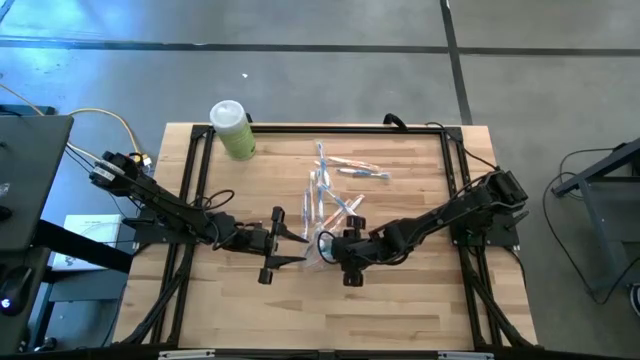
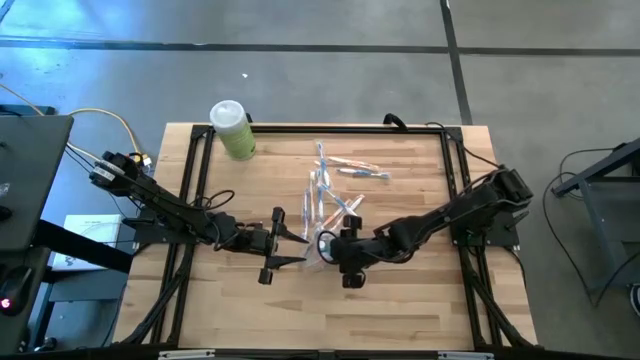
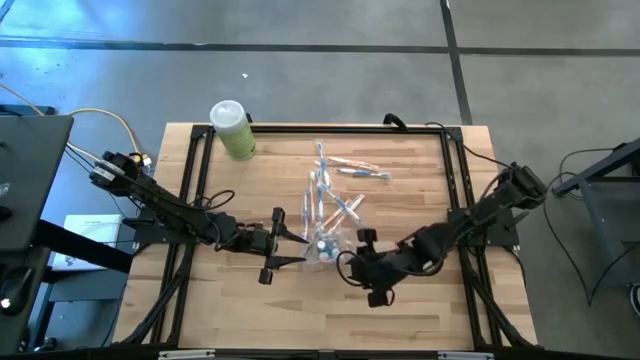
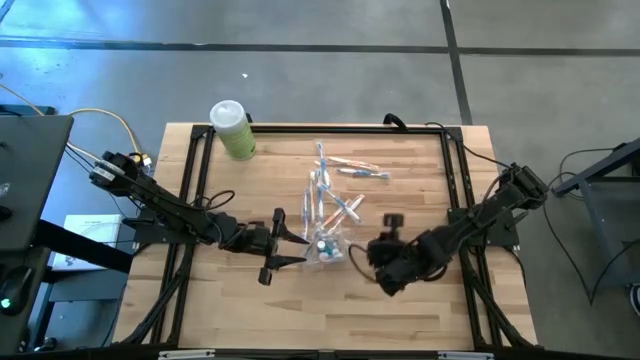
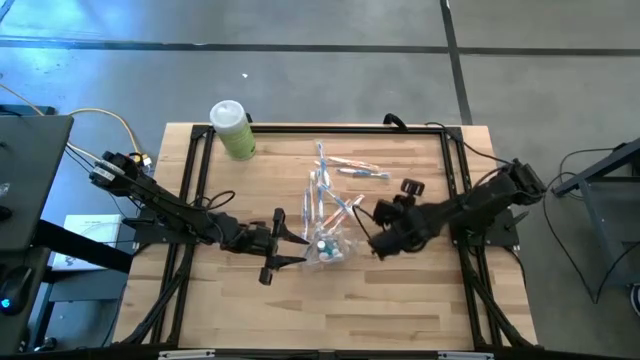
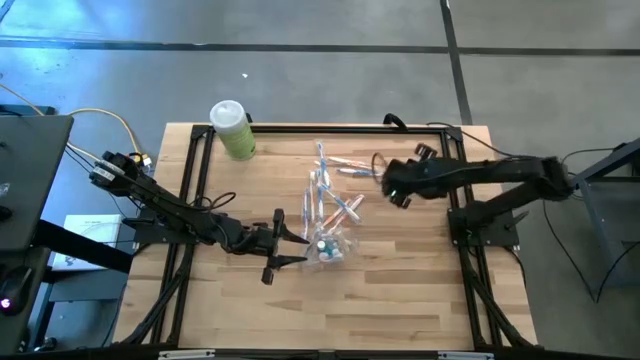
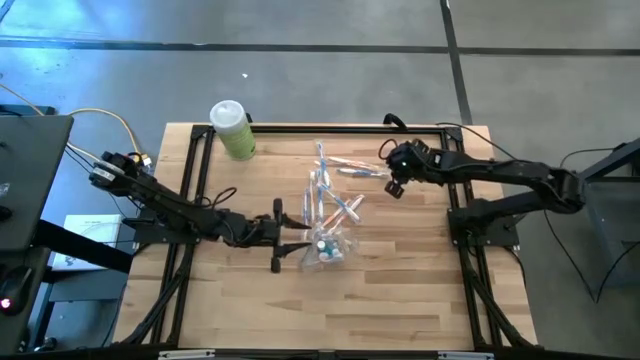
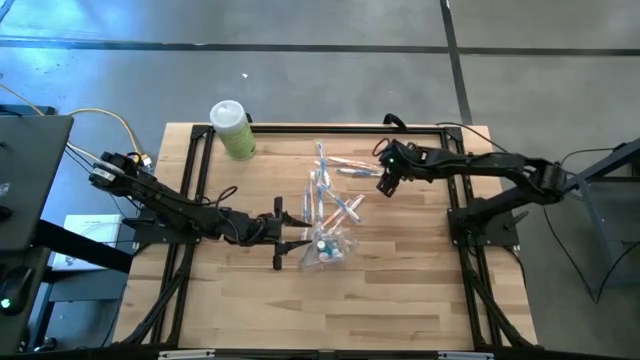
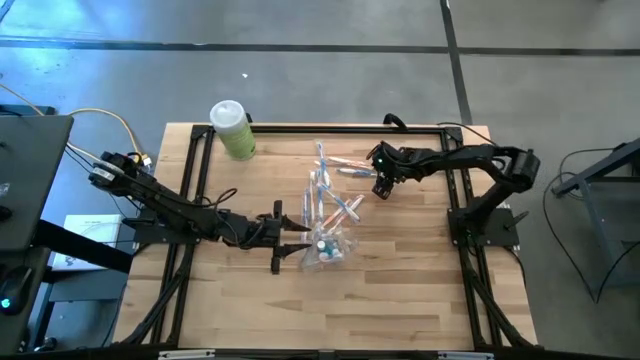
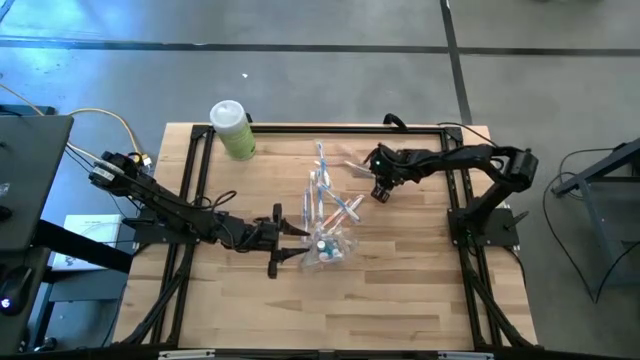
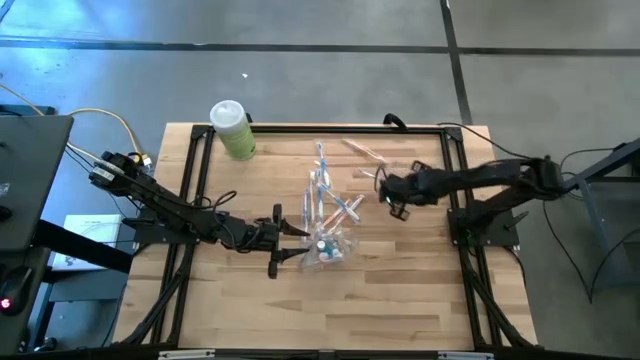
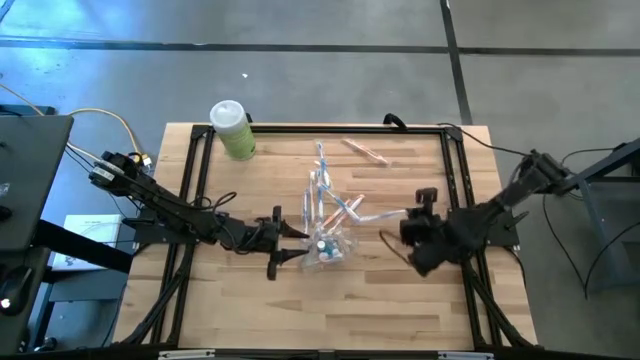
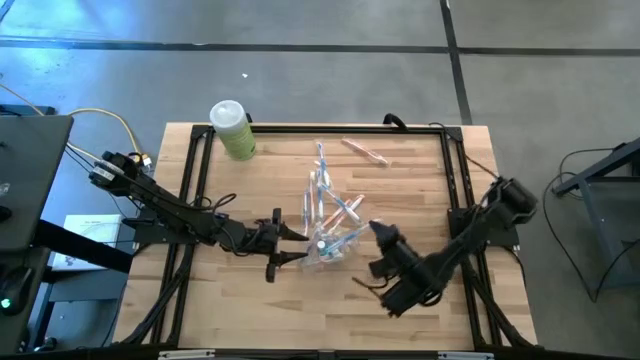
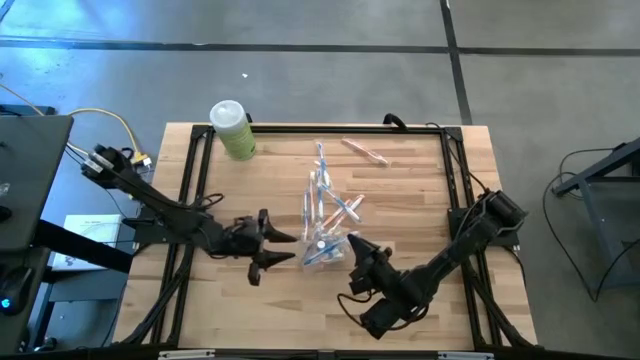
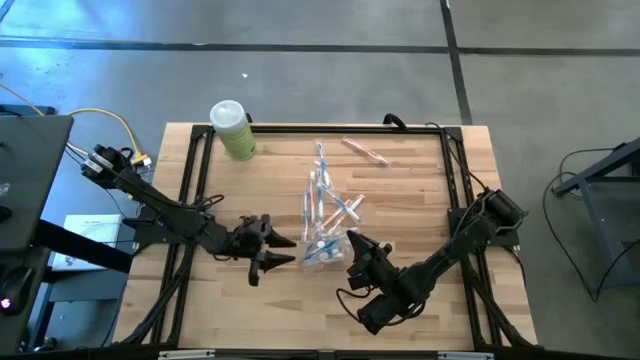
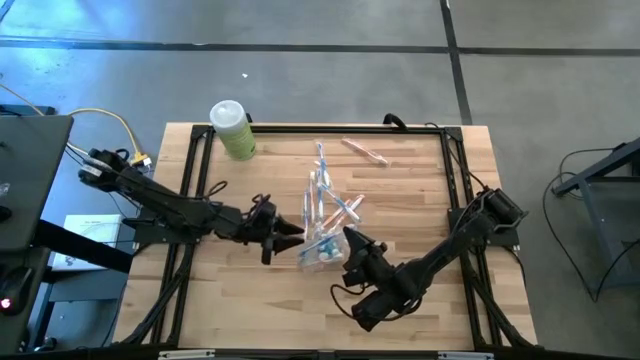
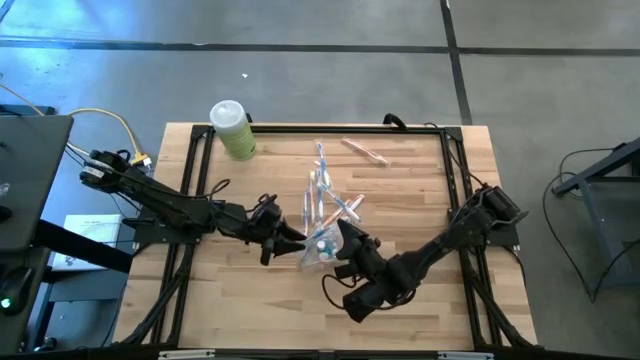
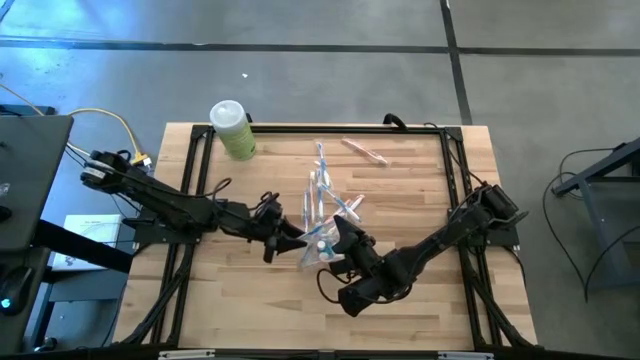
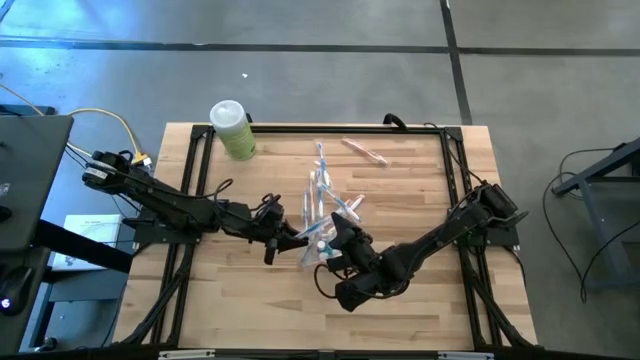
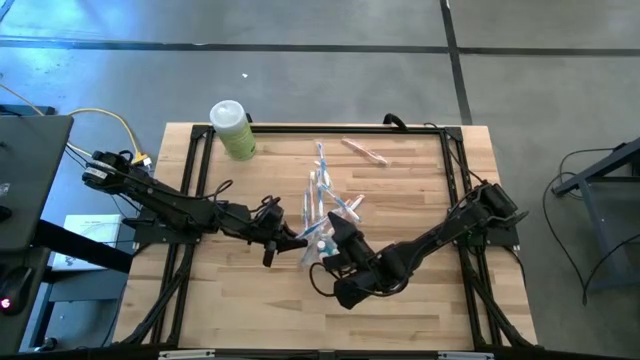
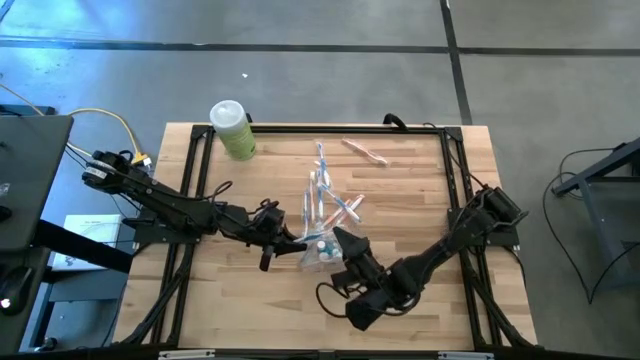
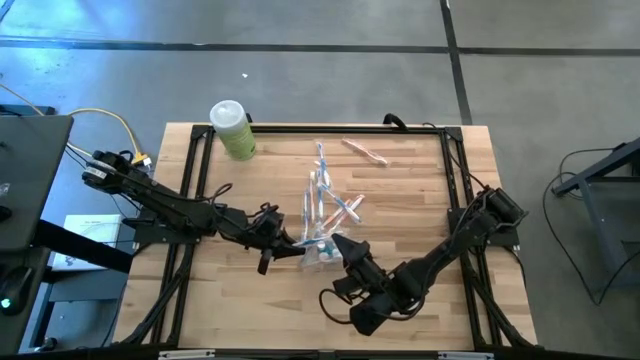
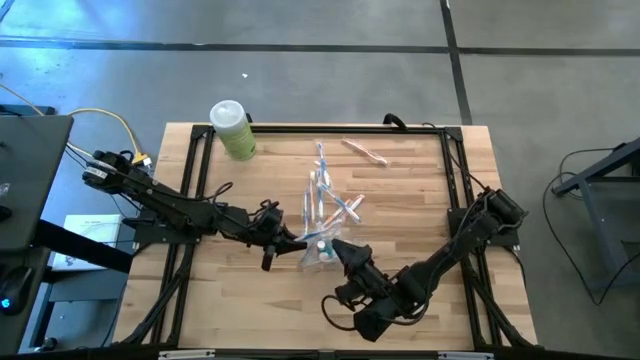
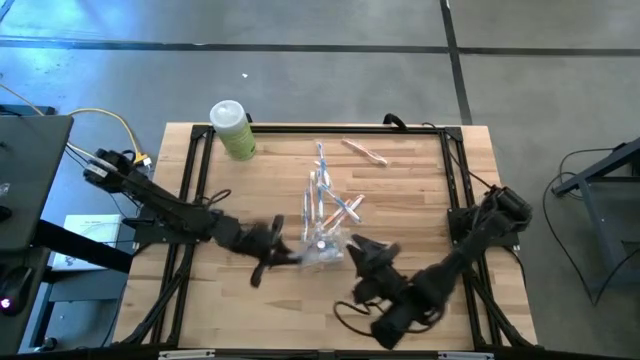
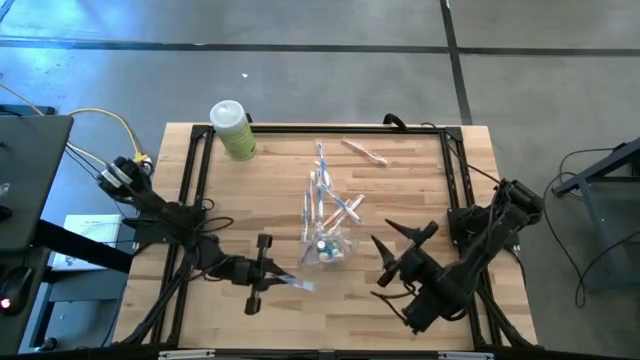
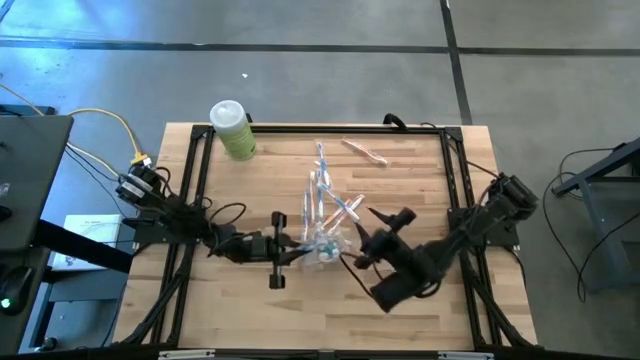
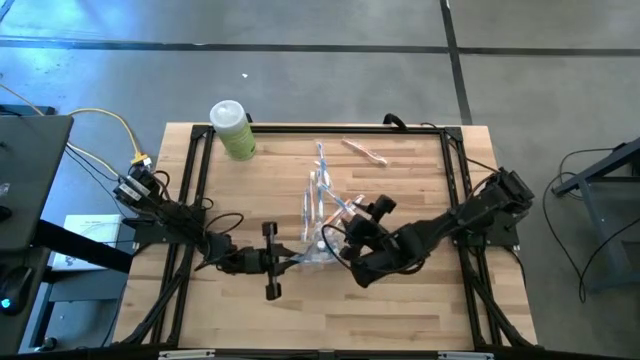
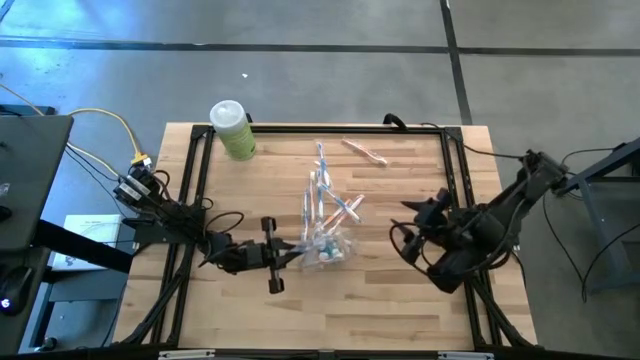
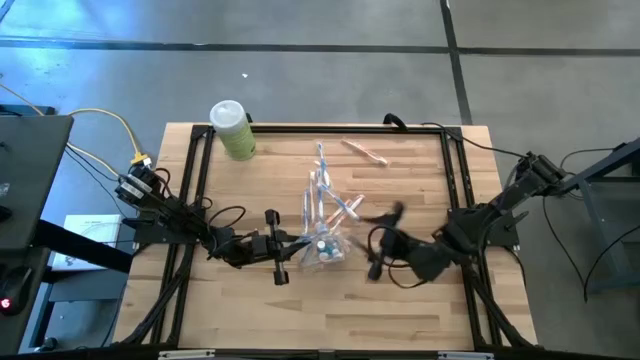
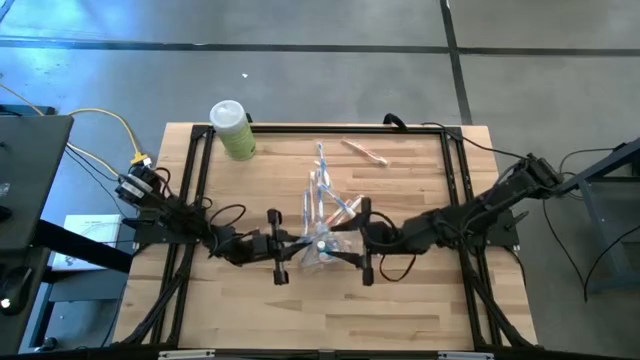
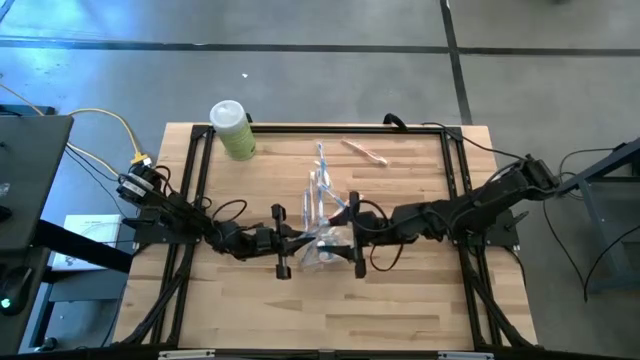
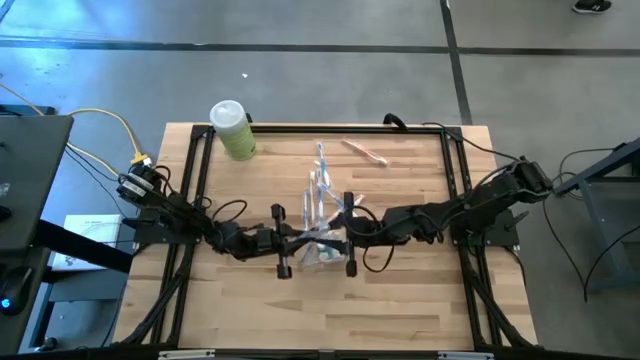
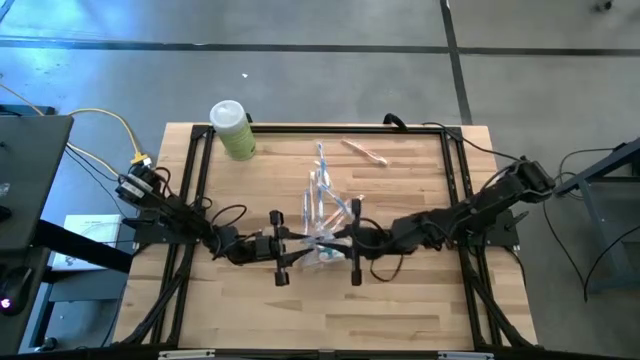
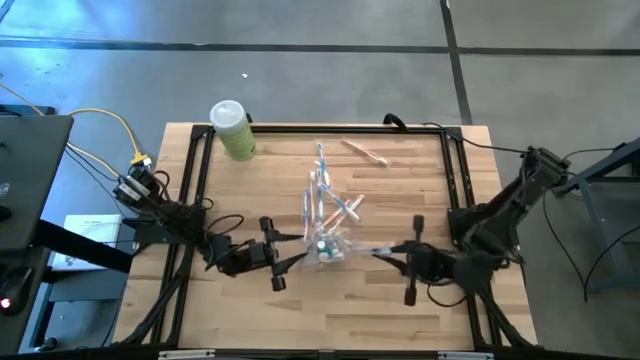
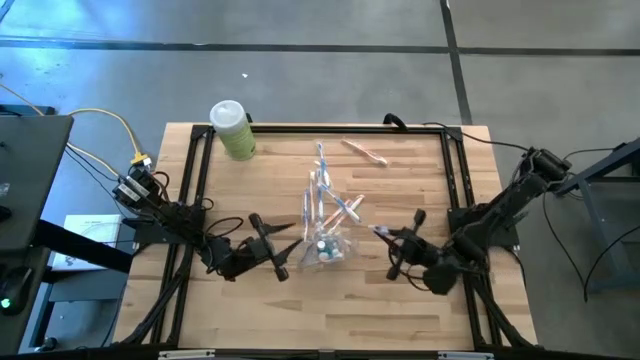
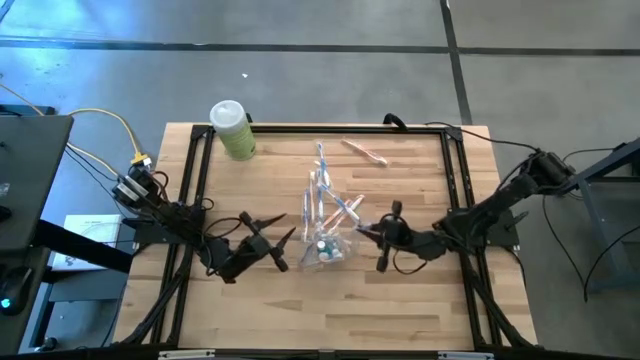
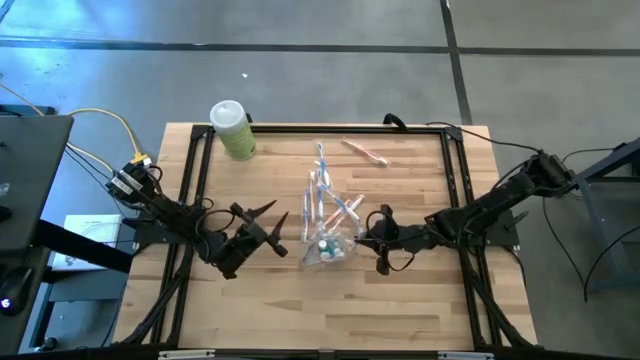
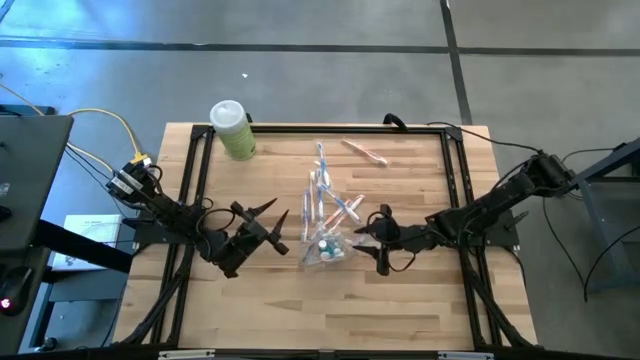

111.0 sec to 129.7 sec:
Task: Pick & Place toothbrushing station
Put the blue toothbrush into the transparent organizer

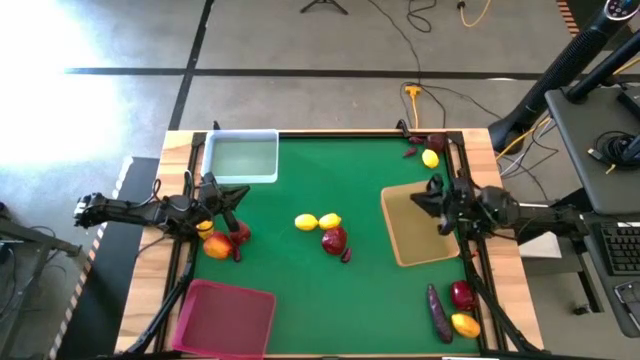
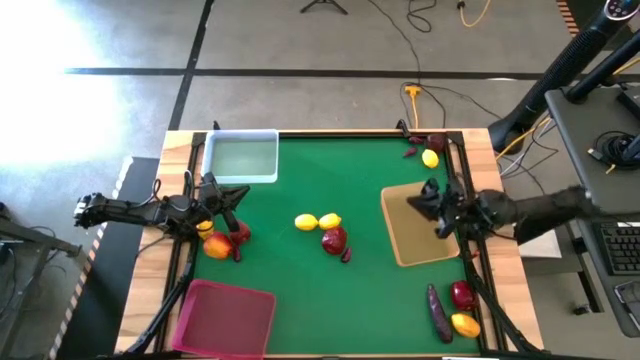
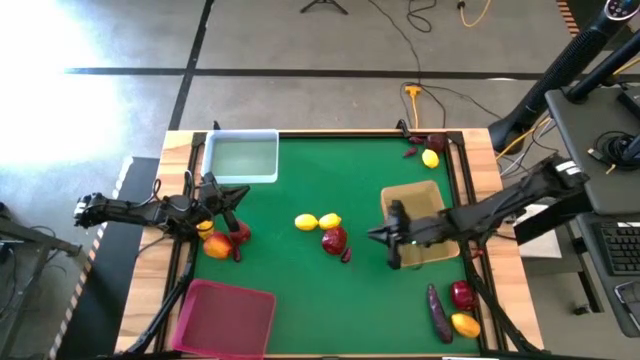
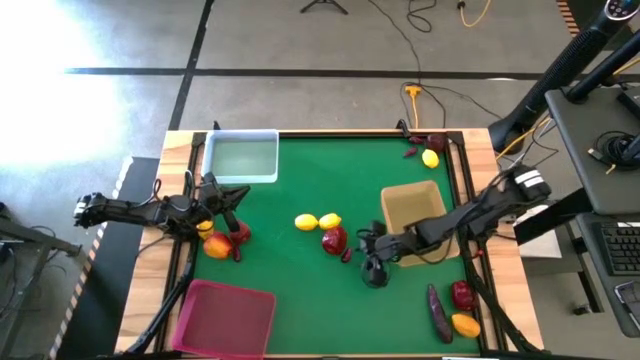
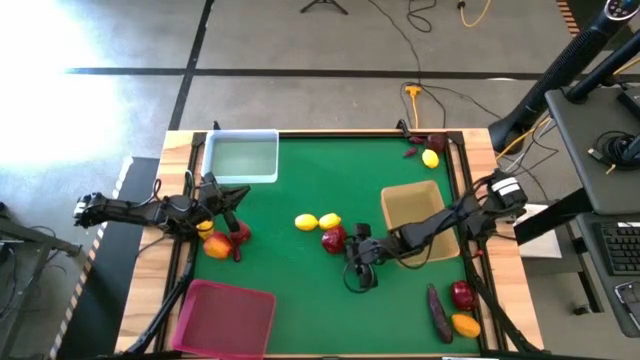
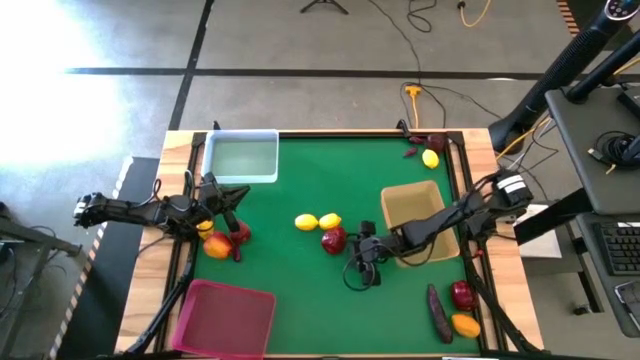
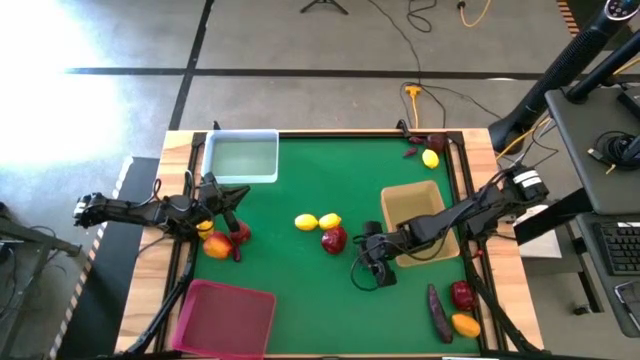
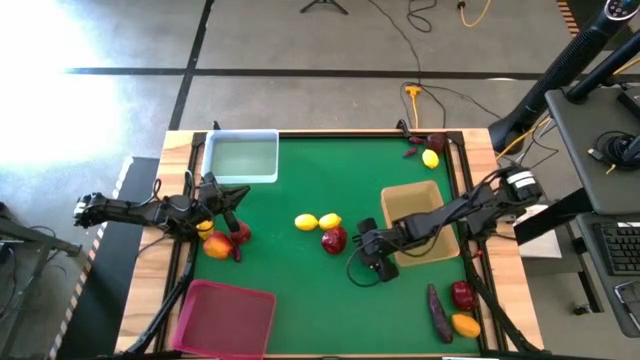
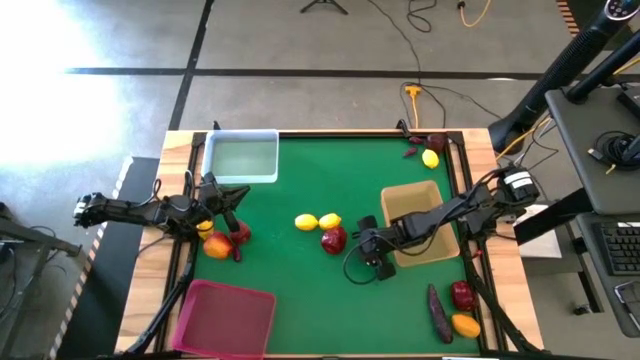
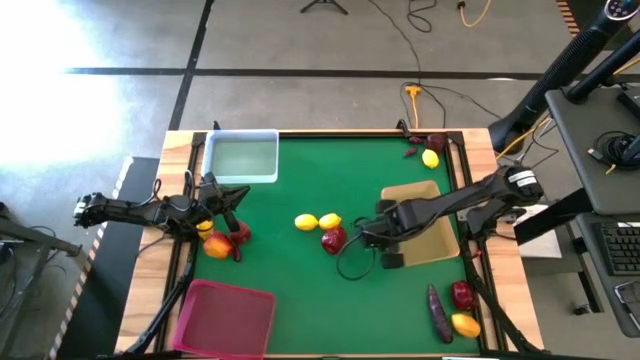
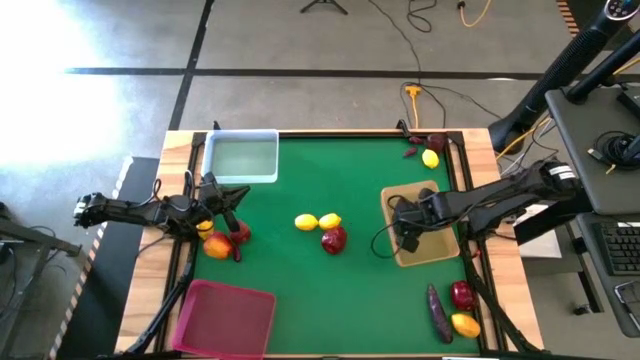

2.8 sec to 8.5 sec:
Task: Sort produce into baskets
Put the small eggplant into the orange transparent bin
